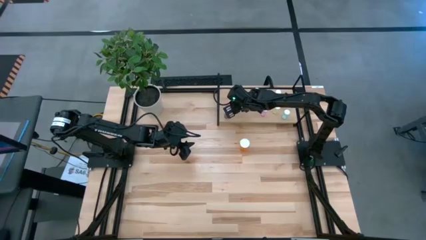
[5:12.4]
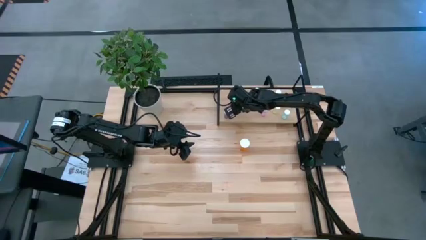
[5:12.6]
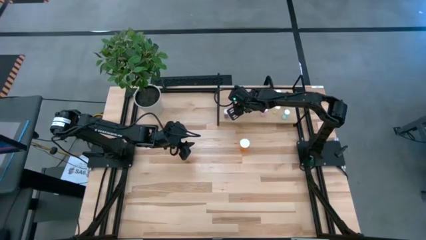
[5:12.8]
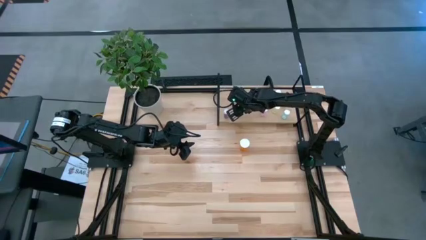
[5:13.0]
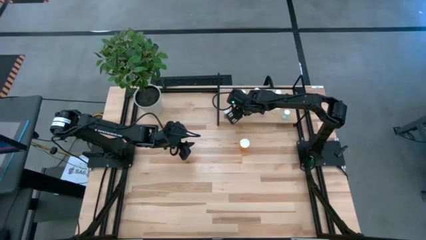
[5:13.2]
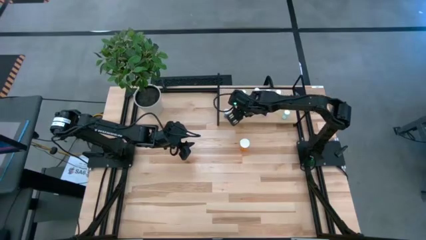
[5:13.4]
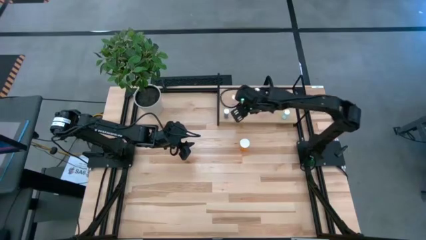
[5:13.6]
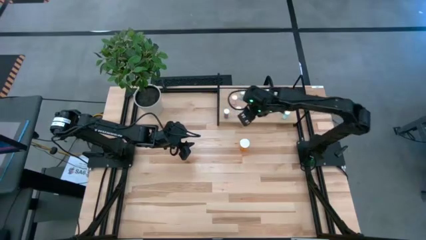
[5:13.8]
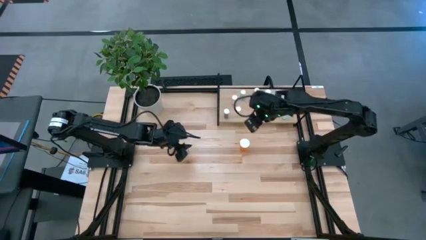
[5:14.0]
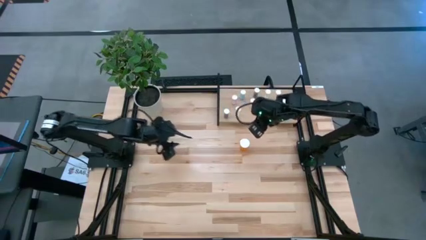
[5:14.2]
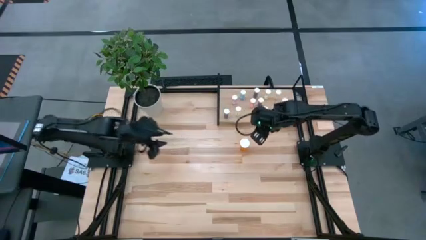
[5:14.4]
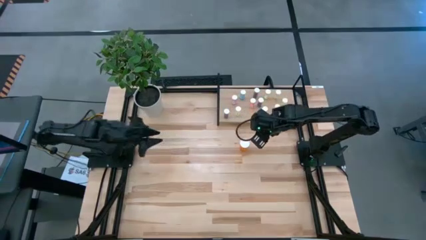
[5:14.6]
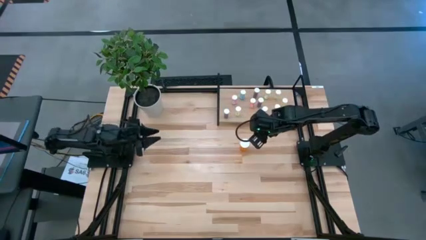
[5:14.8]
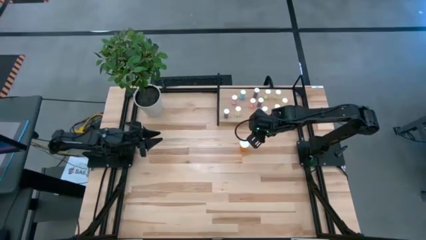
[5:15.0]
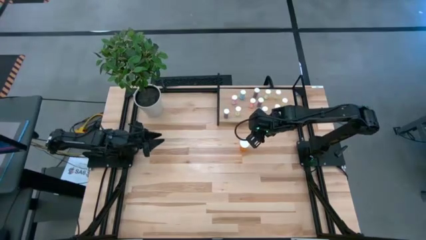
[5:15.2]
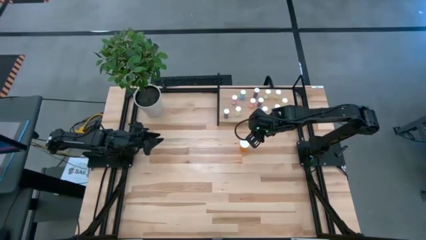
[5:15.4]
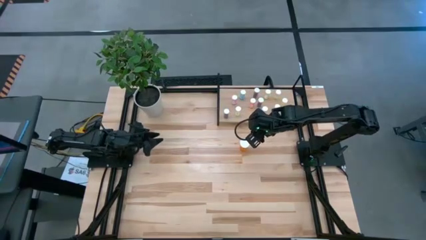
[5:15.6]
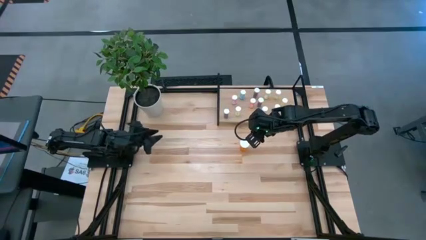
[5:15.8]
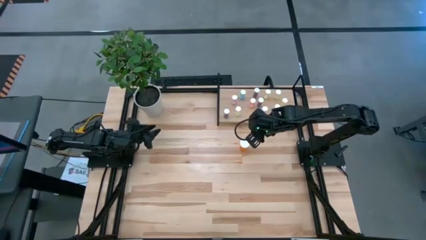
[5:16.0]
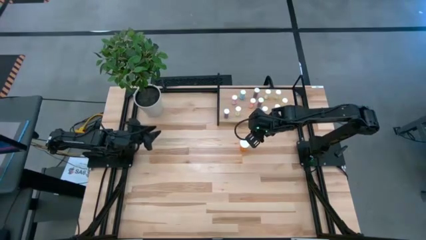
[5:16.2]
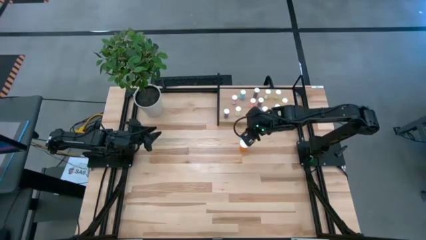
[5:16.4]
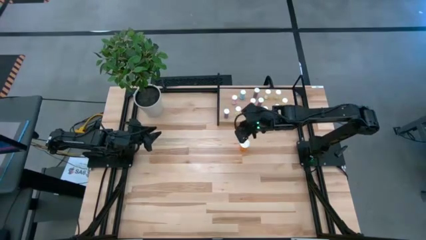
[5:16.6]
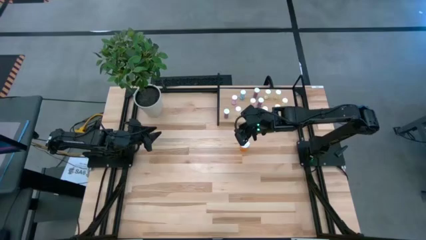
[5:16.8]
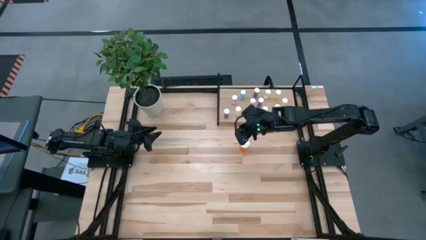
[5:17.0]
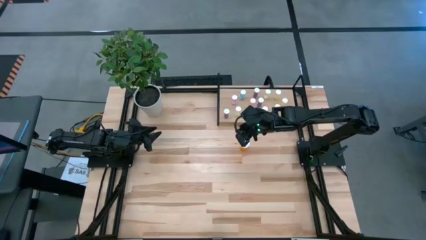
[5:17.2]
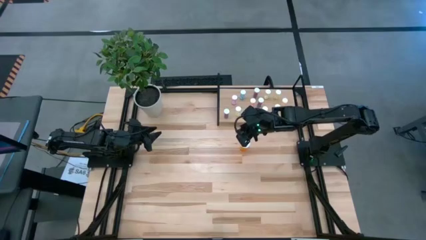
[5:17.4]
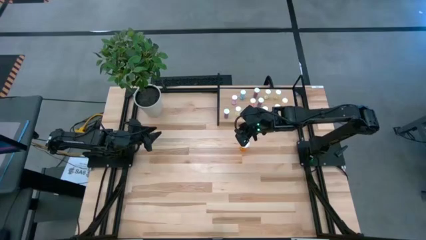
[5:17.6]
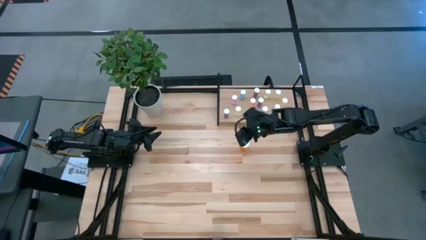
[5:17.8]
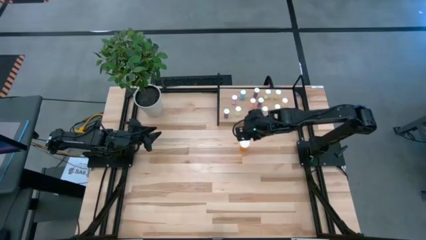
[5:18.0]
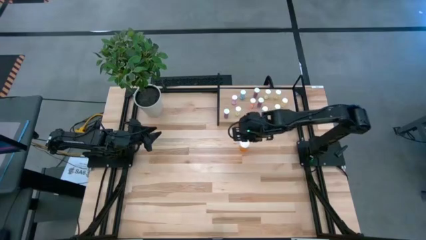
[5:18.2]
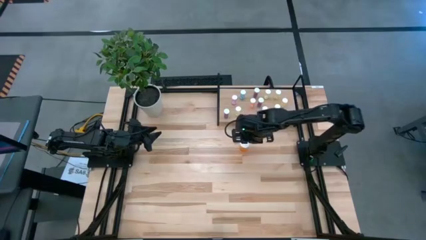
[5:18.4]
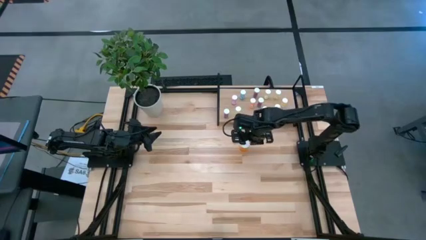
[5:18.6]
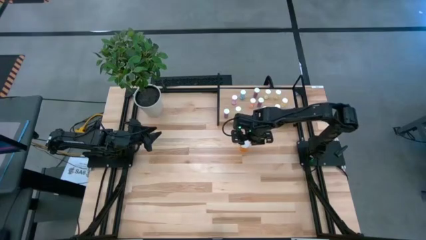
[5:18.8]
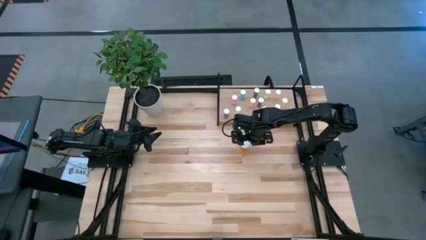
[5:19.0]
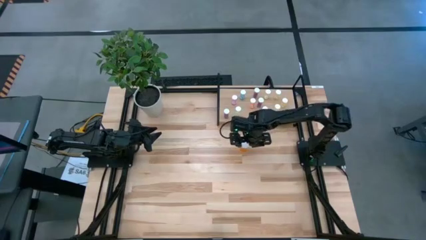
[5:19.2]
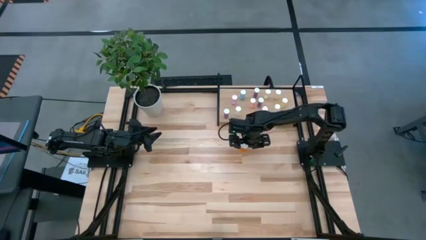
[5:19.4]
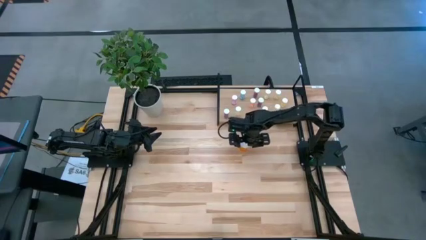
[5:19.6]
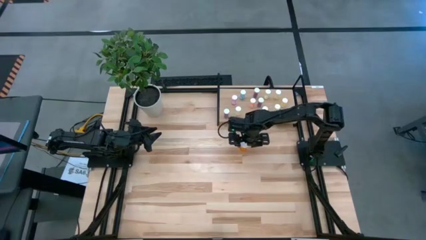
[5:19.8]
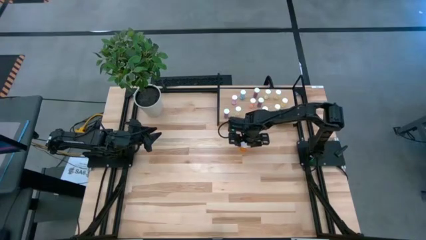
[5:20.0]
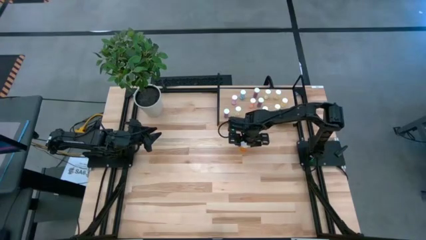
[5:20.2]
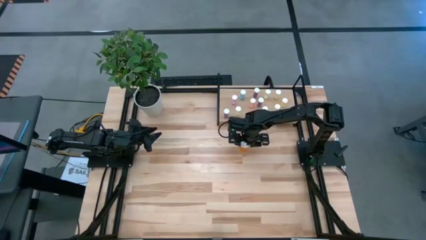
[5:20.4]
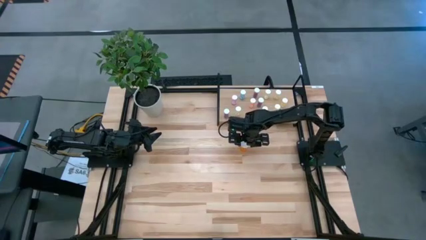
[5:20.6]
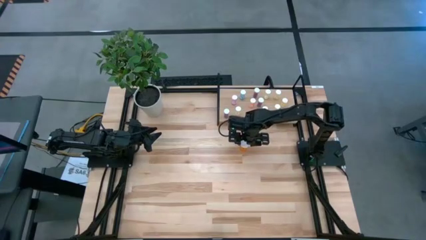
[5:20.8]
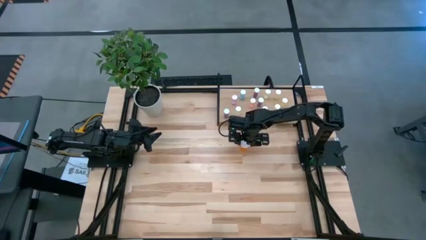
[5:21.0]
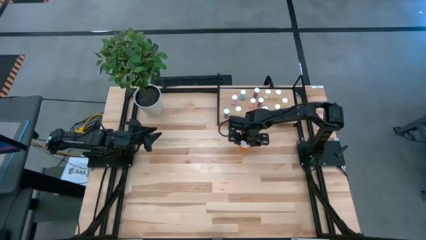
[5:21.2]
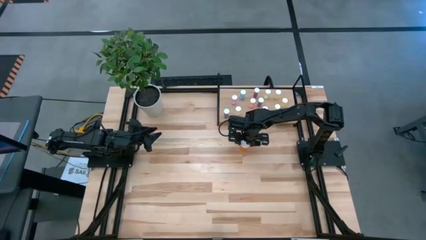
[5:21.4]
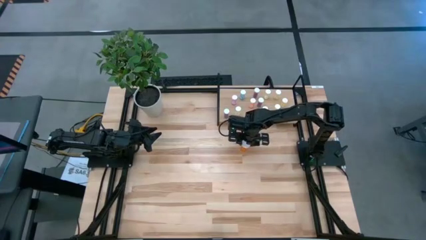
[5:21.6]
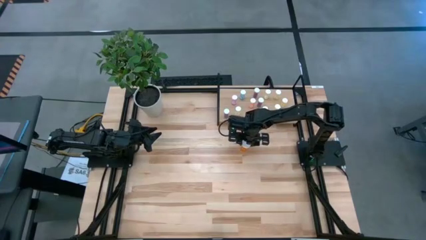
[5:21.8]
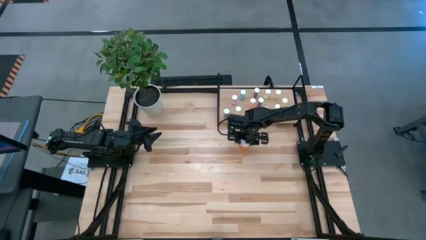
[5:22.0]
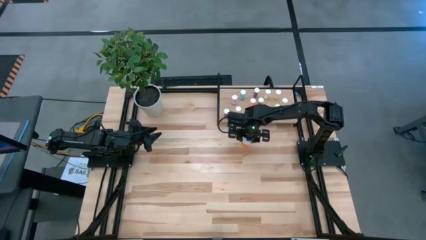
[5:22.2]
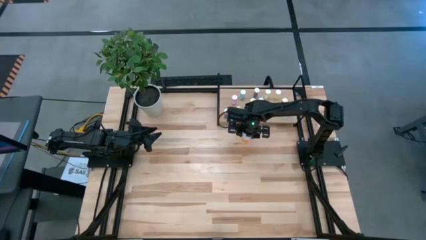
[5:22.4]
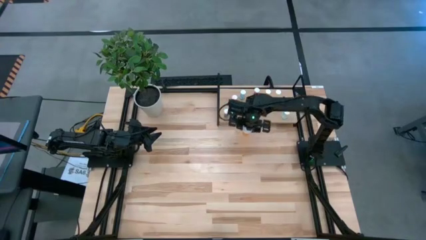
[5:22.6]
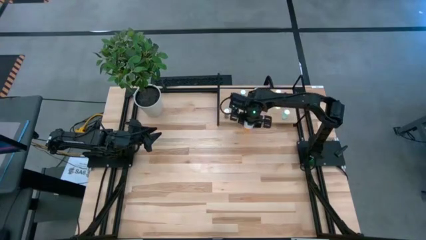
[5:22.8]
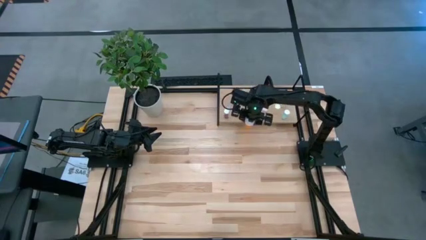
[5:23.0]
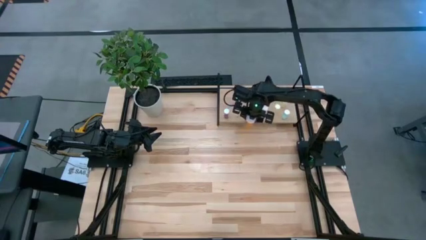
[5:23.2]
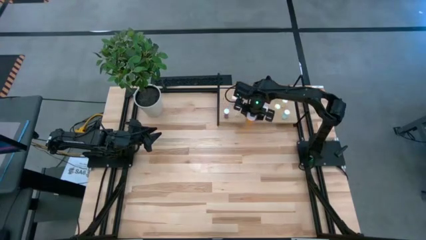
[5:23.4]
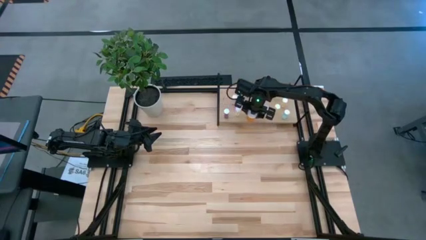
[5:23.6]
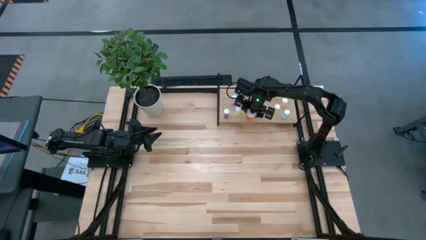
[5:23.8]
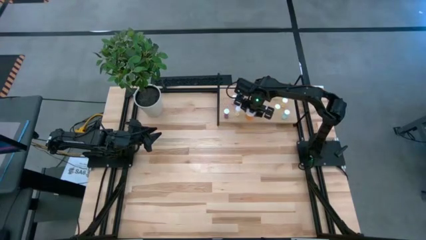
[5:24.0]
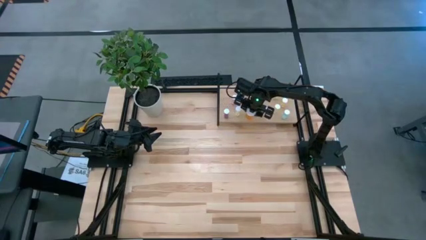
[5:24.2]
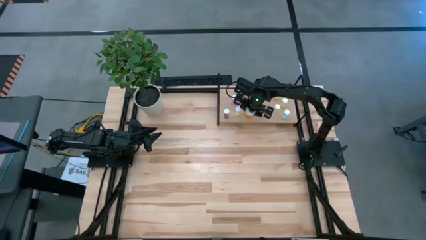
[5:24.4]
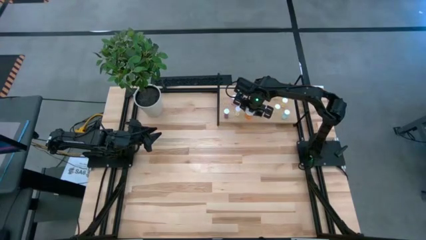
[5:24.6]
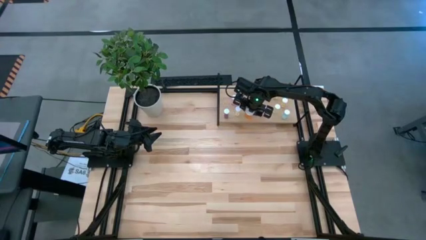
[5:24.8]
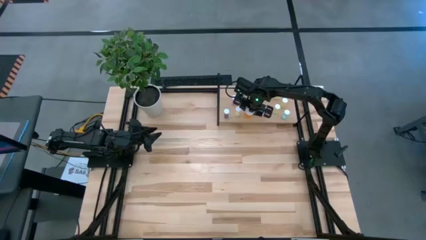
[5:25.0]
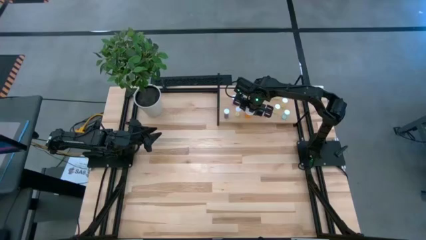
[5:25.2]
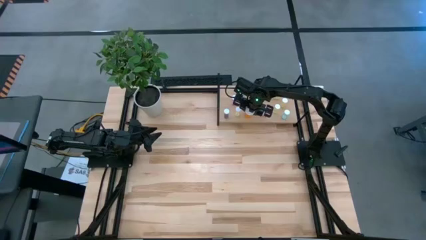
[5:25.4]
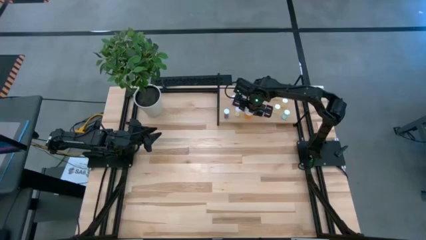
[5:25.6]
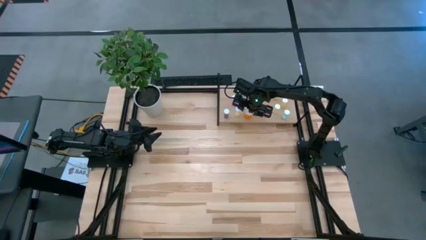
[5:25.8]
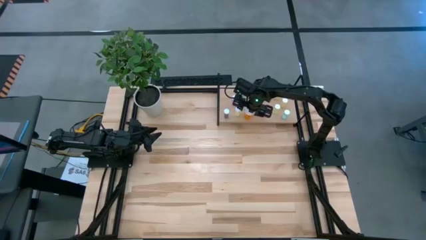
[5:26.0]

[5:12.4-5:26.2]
Task: Pick and place medicine bottles onto shelf by color
Put the orange pill bottle on the shelf
